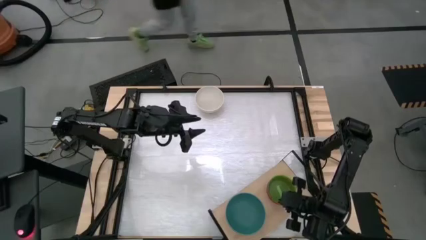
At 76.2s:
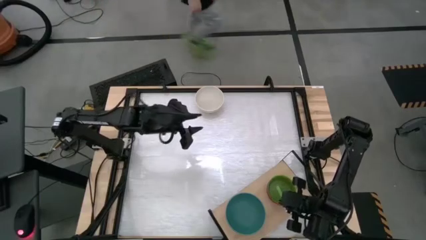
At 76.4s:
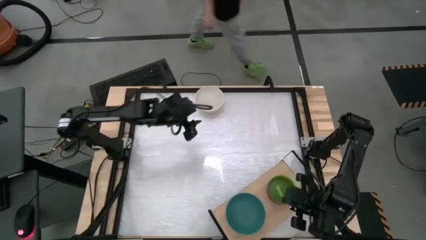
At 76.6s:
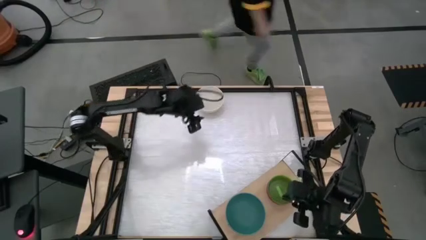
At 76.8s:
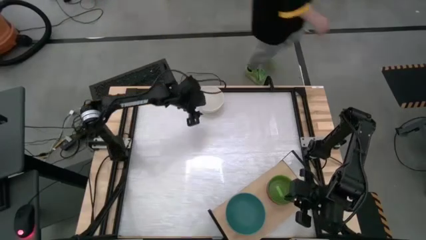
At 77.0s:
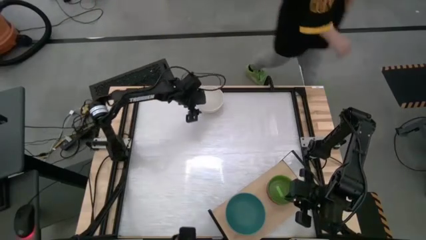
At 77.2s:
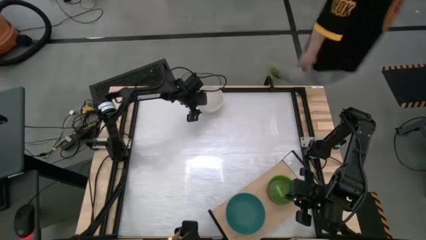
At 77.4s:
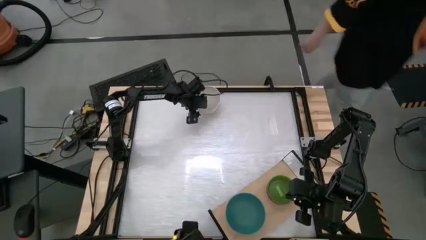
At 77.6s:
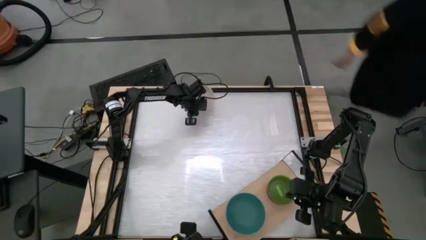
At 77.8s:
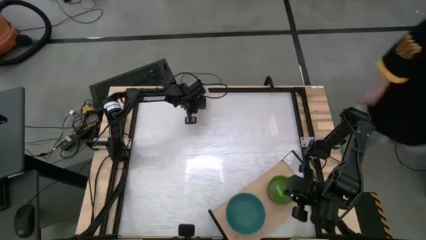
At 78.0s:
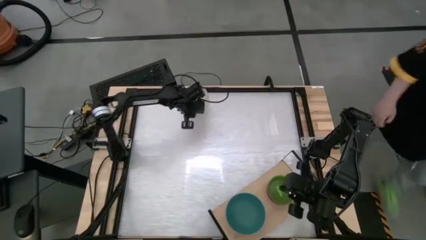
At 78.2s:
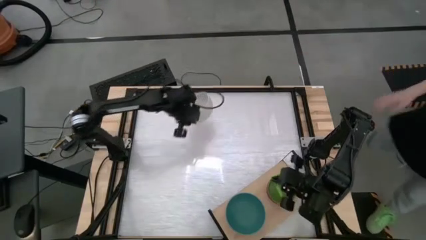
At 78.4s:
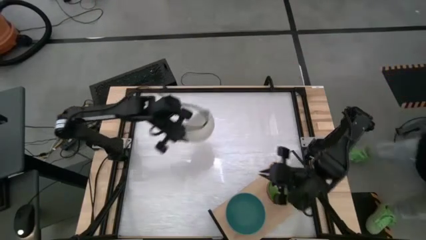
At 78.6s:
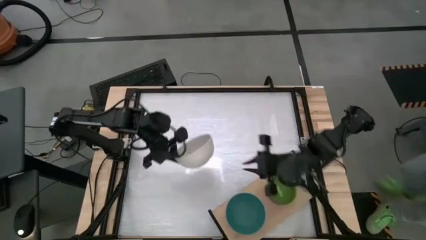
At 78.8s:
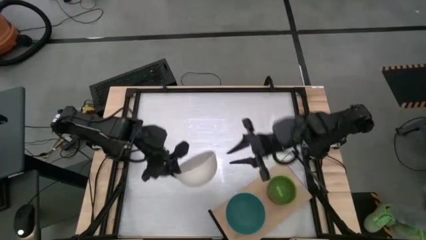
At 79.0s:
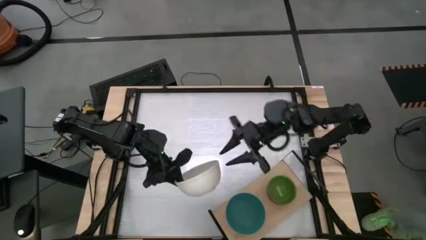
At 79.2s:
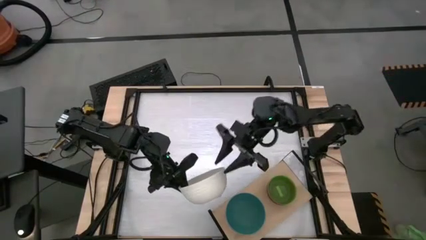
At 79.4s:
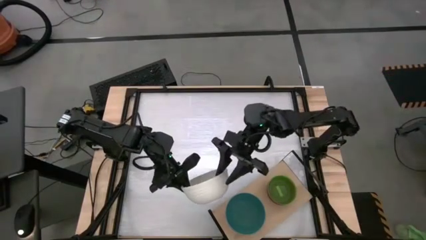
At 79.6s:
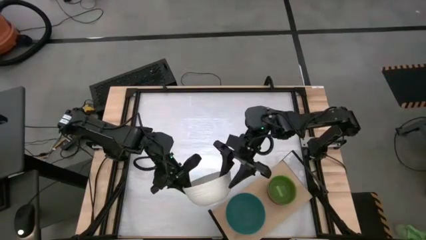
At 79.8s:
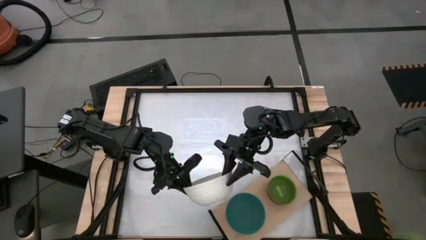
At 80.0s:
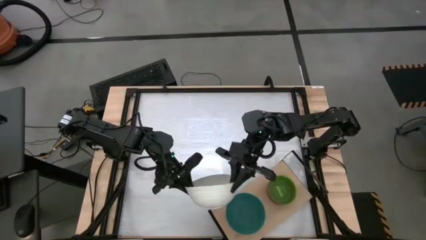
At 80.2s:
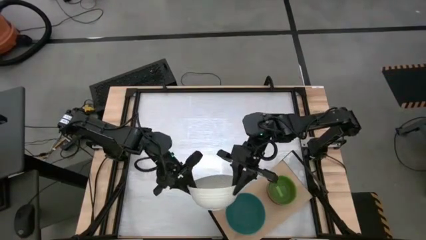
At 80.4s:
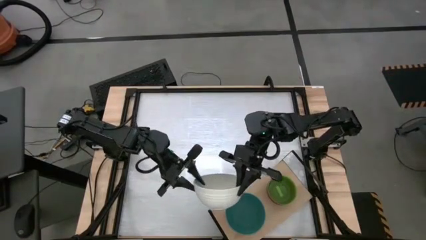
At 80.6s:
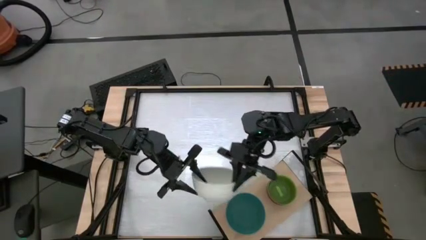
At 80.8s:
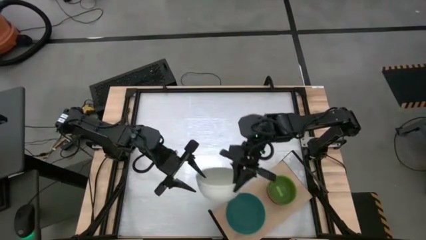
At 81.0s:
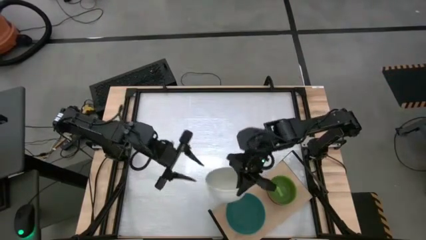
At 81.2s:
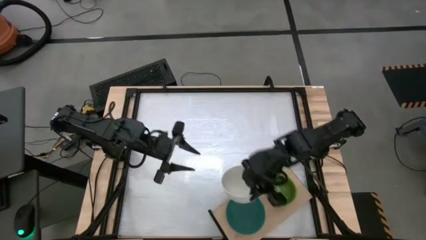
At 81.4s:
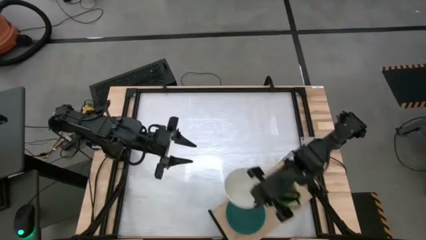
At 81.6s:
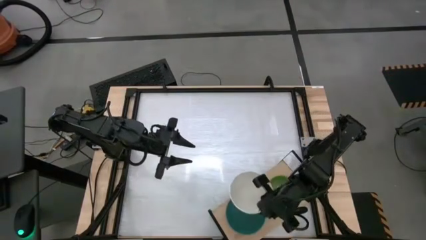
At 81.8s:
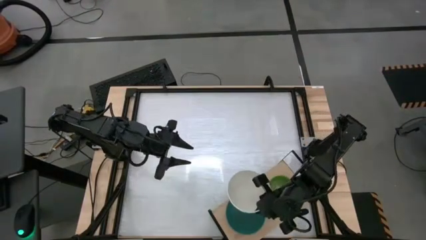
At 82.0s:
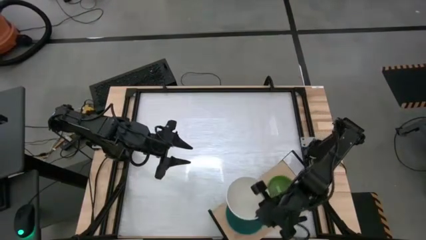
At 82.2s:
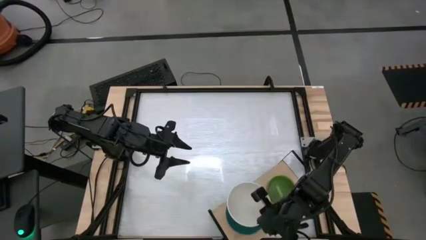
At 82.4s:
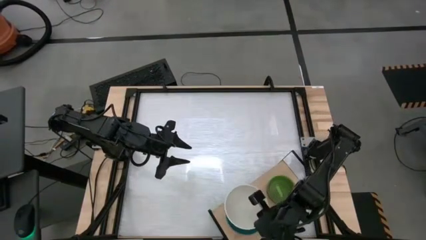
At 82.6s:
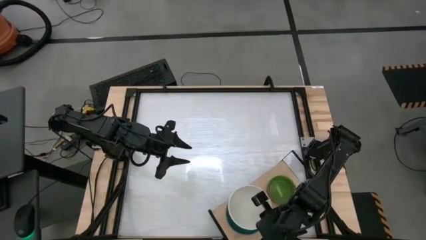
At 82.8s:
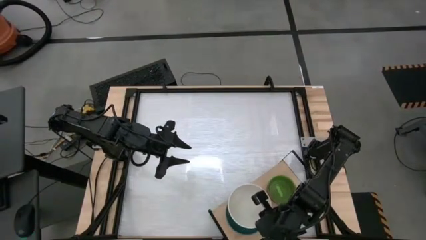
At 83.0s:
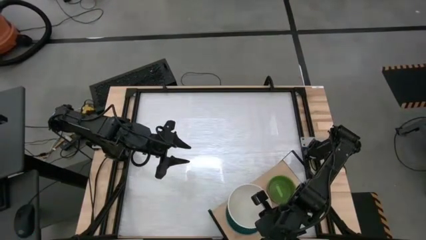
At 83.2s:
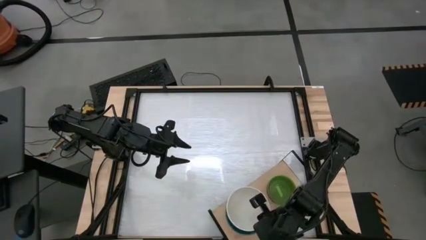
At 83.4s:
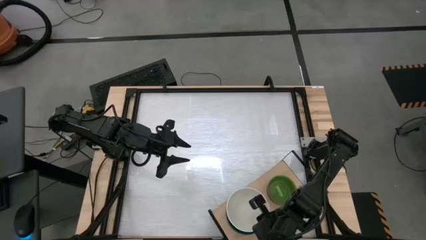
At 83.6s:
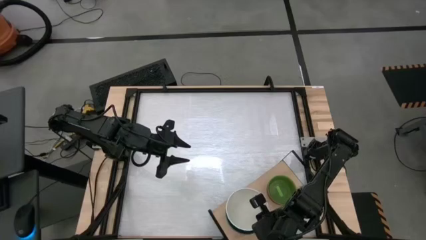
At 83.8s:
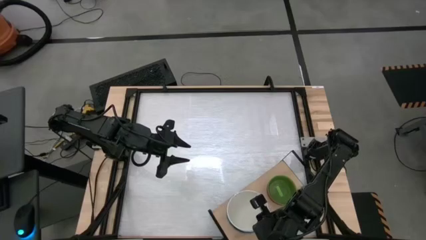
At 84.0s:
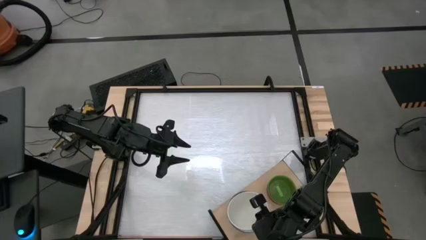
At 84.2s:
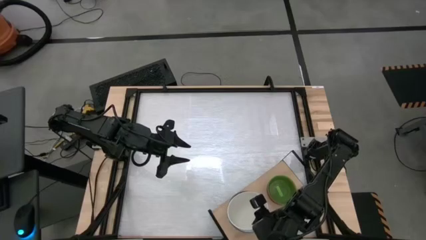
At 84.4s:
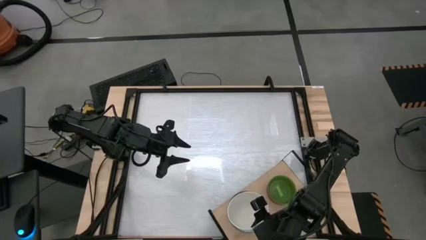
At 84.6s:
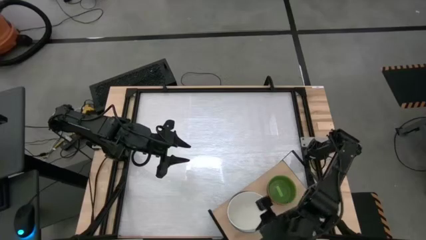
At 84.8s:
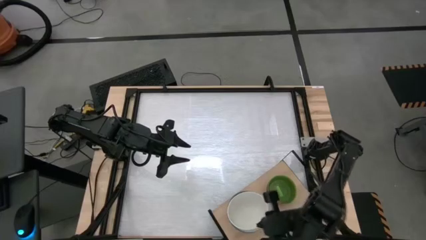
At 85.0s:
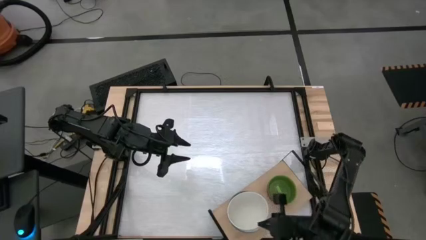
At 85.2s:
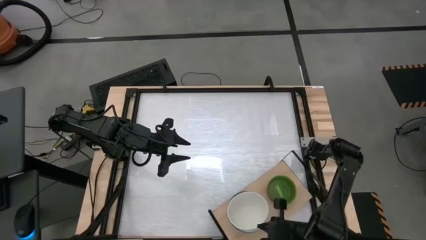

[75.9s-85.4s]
Task: Place and stack bowls onto a shelf
Stack the white bowl on top of the dark green bowl on the shelf

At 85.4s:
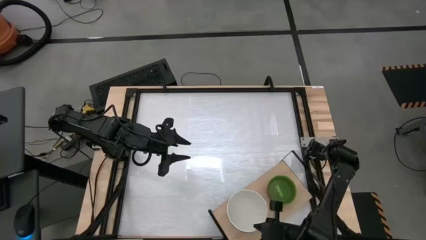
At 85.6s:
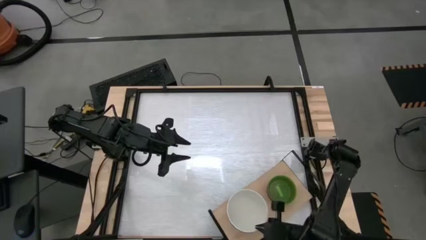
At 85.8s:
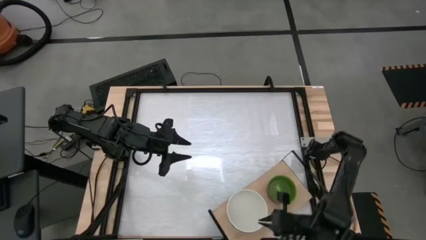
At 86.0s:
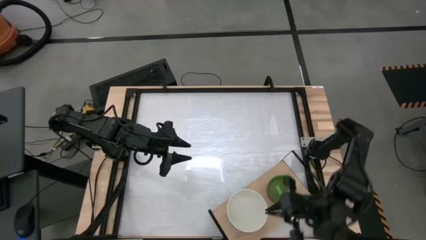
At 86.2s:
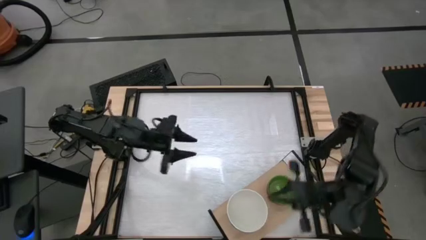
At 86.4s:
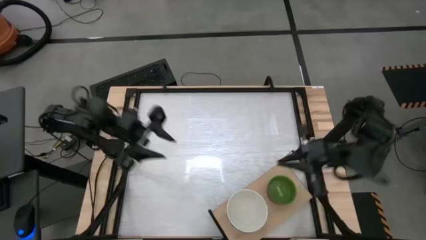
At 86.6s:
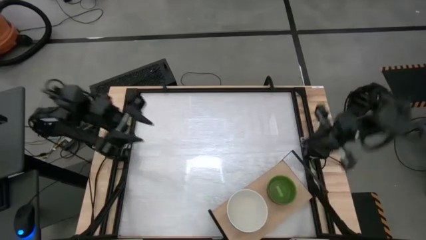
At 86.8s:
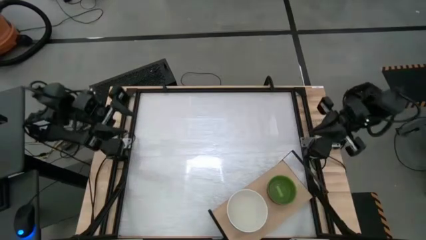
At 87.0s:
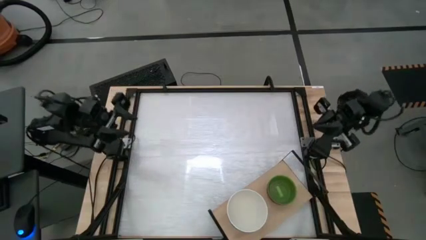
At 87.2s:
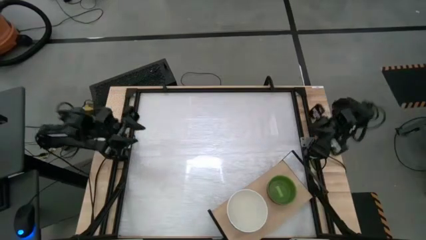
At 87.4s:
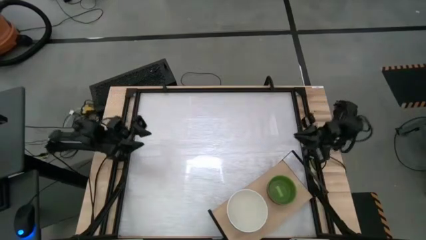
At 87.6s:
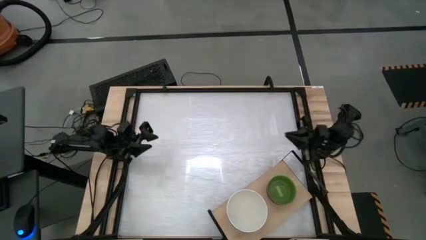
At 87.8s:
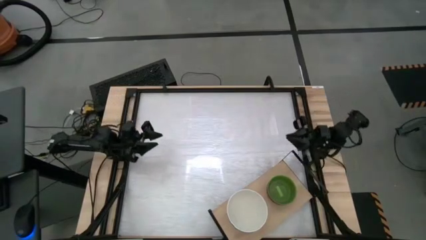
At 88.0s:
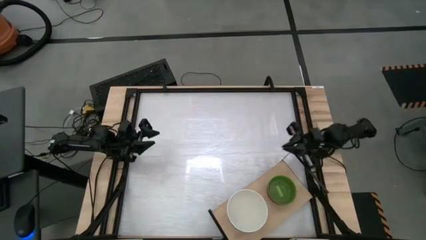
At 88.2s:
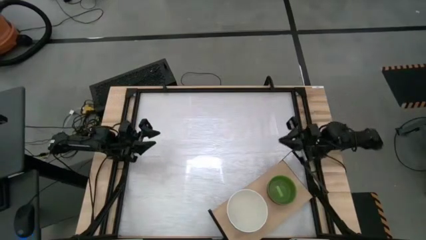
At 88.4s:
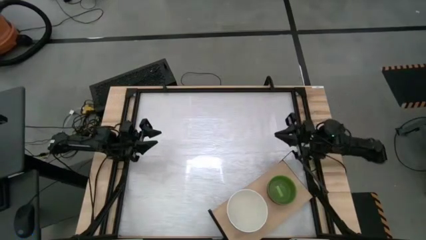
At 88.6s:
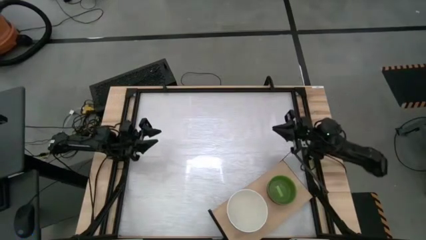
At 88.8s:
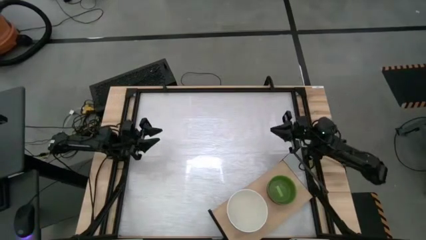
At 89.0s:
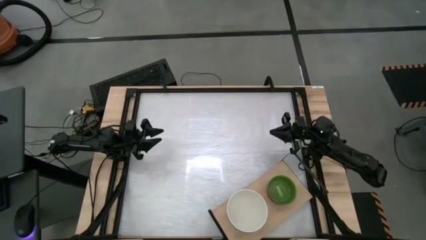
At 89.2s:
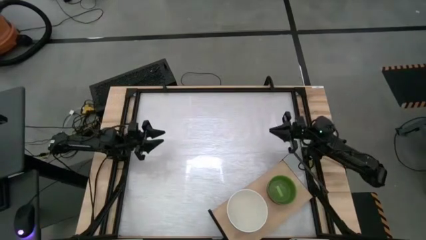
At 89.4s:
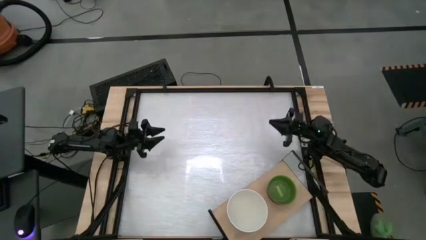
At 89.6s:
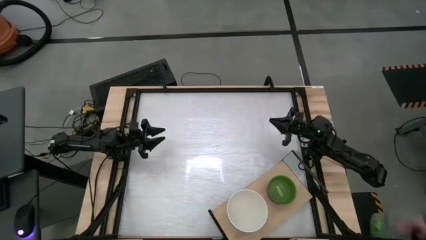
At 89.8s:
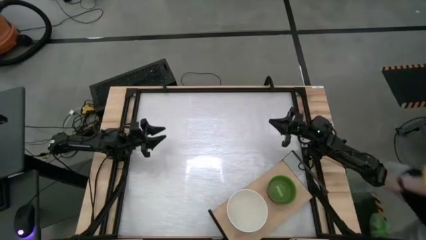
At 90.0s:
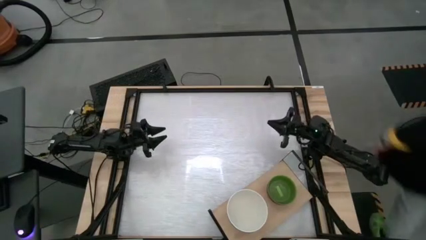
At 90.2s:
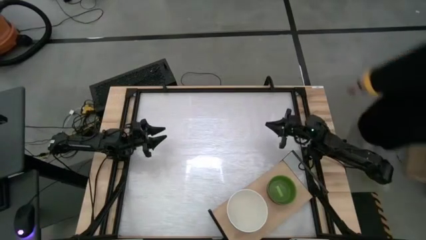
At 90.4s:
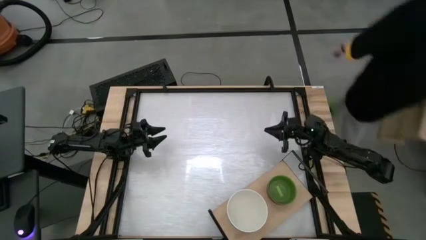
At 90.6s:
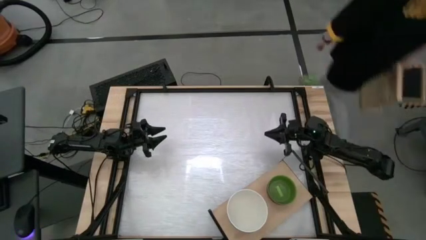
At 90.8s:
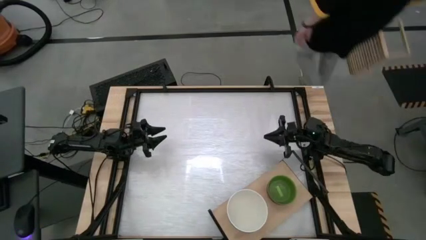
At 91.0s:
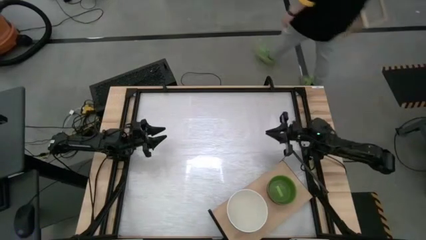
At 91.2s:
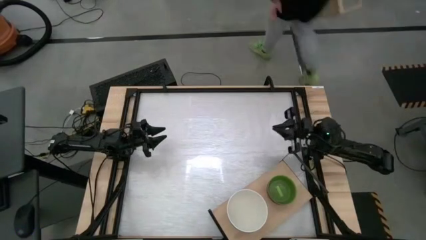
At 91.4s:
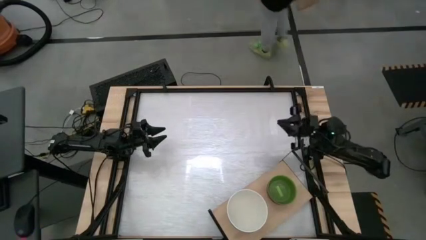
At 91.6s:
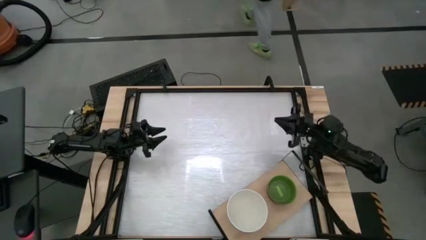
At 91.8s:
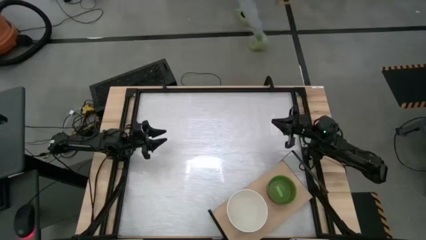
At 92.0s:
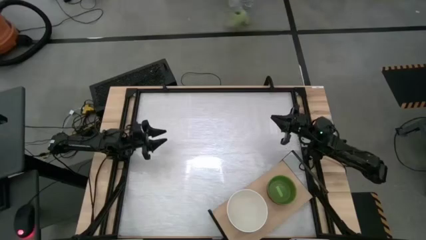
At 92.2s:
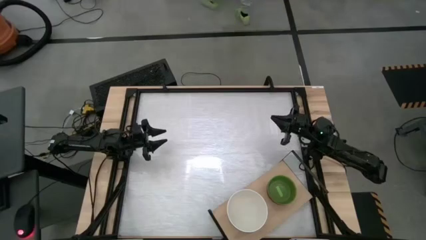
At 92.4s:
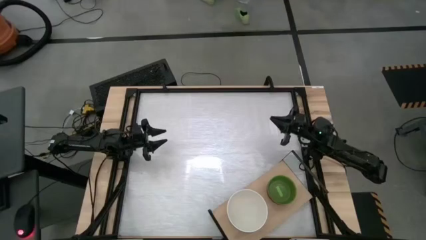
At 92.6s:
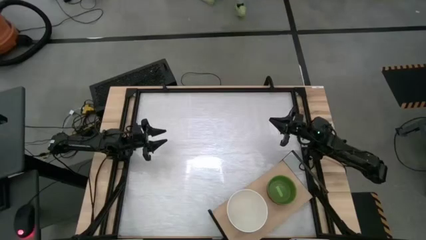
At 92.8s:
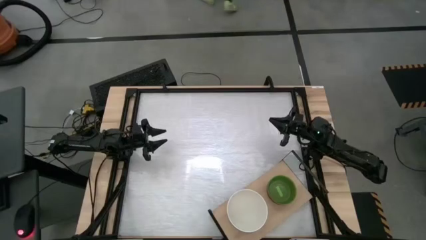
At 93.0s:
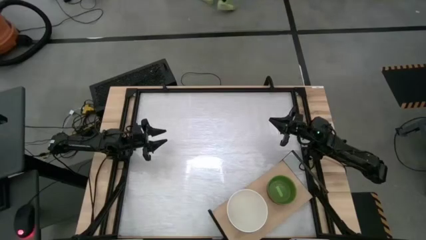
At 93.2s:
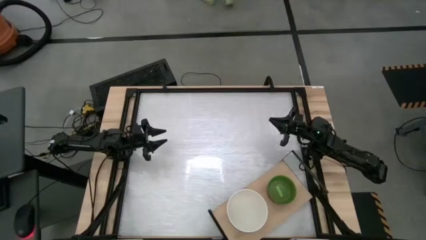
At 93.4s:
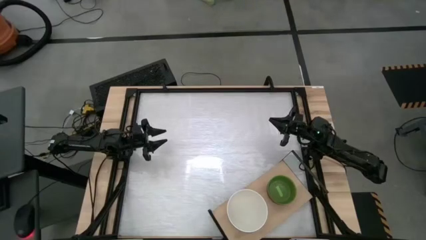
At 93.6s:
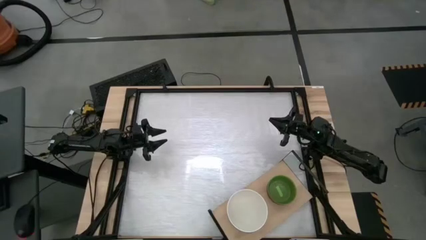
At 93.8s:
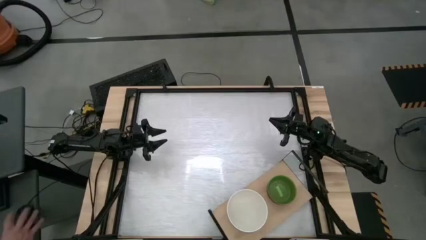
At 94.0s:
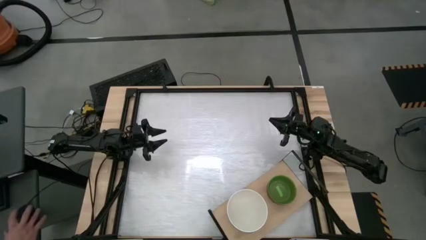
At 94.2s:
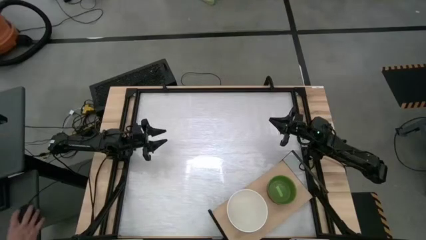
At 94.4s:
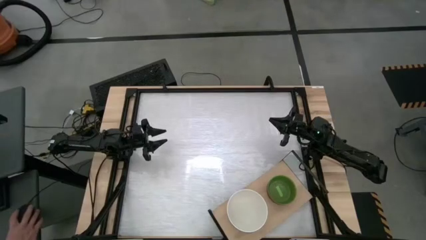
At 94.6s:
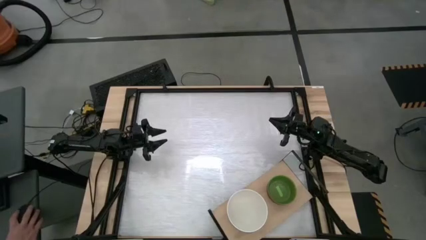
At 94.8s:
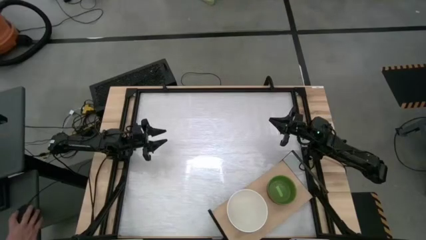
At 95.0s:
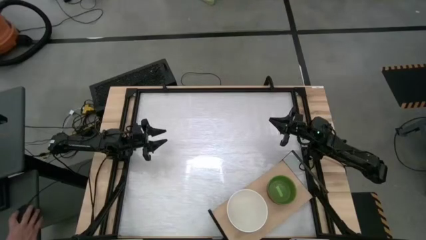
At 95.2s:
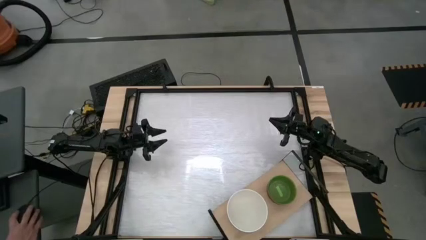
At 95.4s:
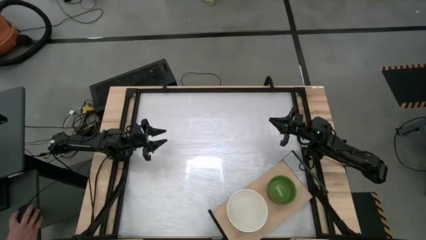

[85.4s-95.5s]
Return to Home Position
